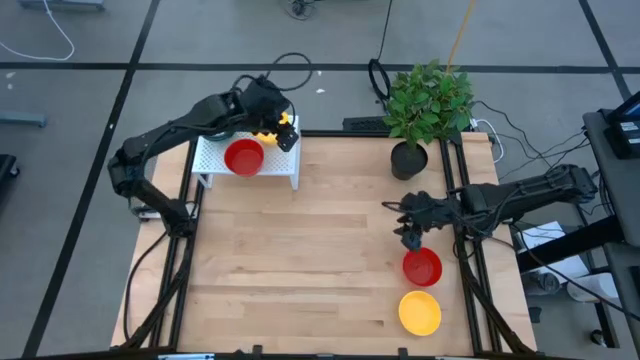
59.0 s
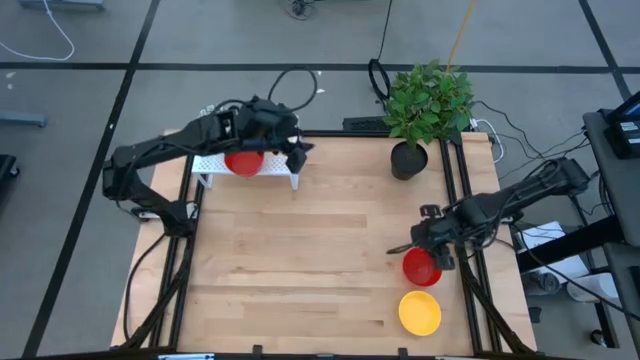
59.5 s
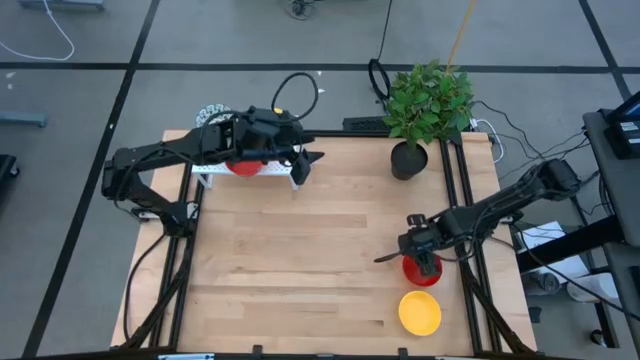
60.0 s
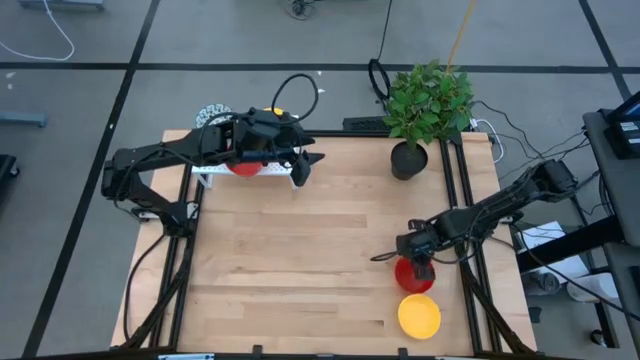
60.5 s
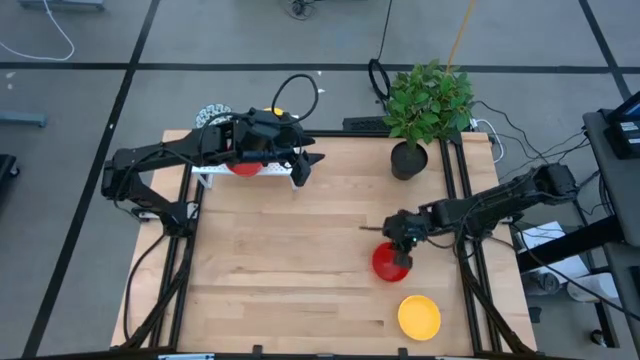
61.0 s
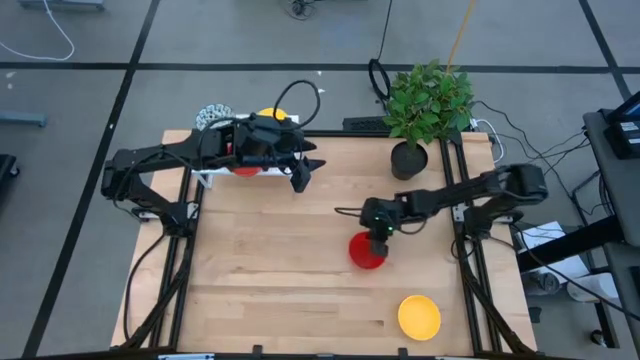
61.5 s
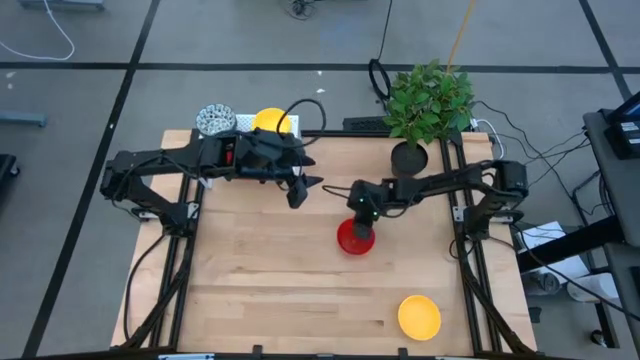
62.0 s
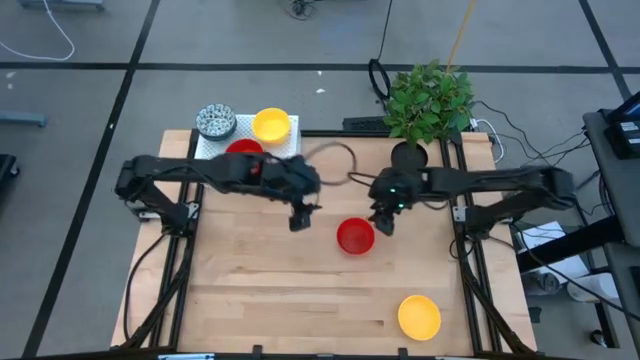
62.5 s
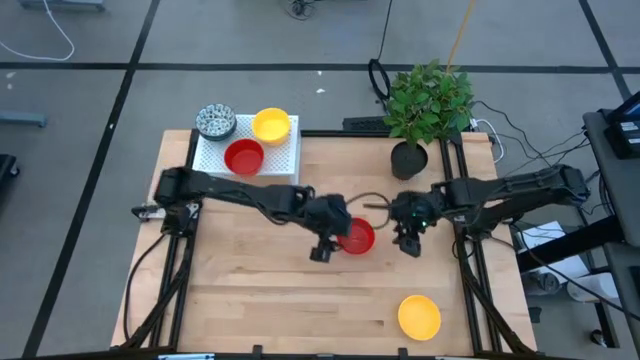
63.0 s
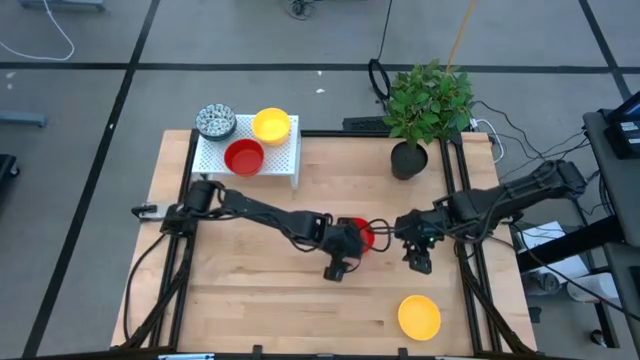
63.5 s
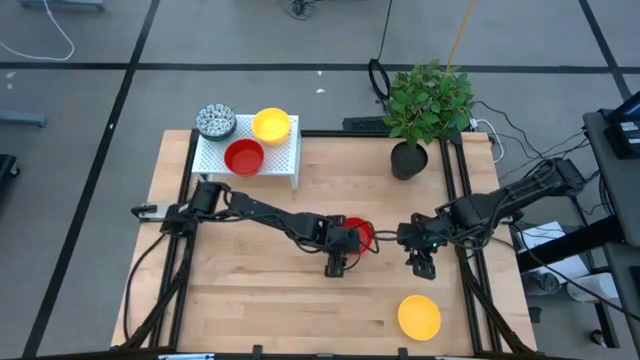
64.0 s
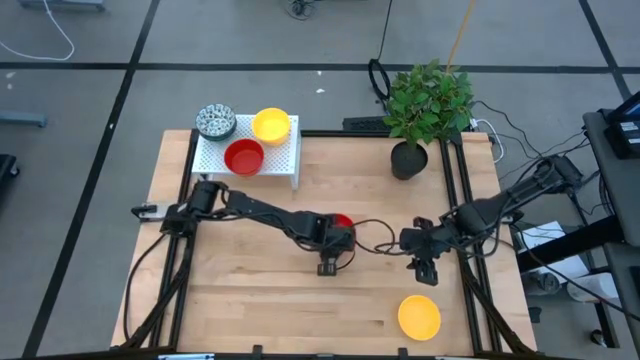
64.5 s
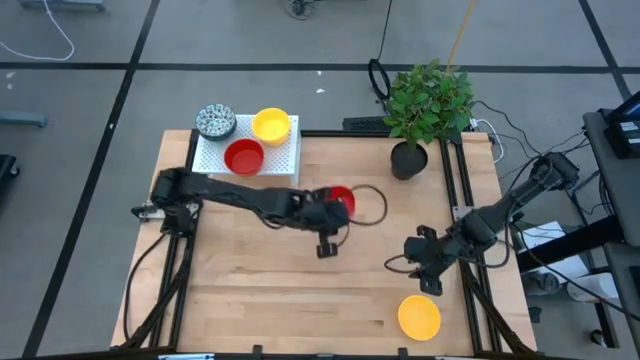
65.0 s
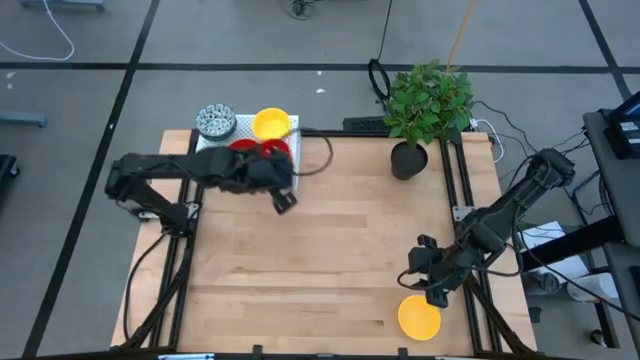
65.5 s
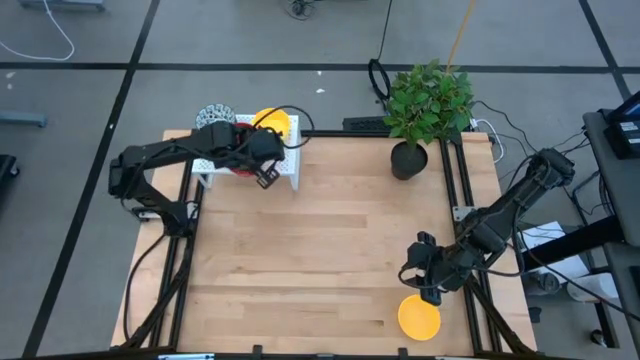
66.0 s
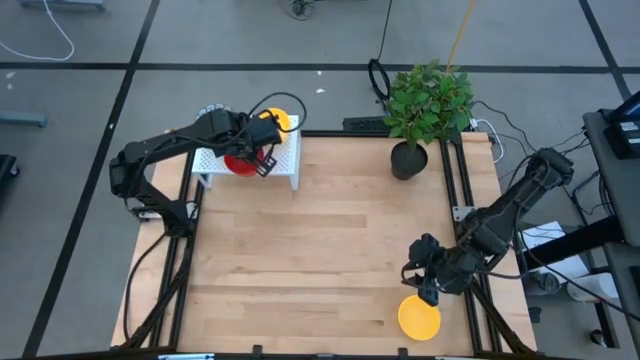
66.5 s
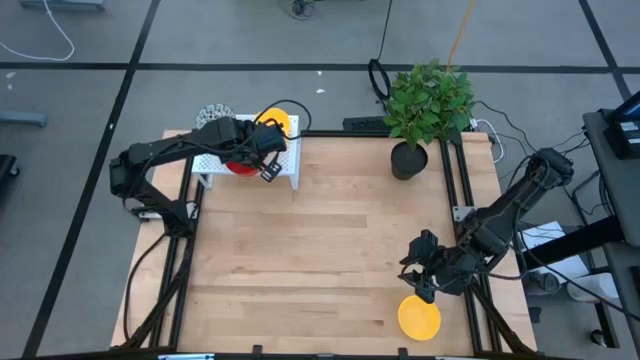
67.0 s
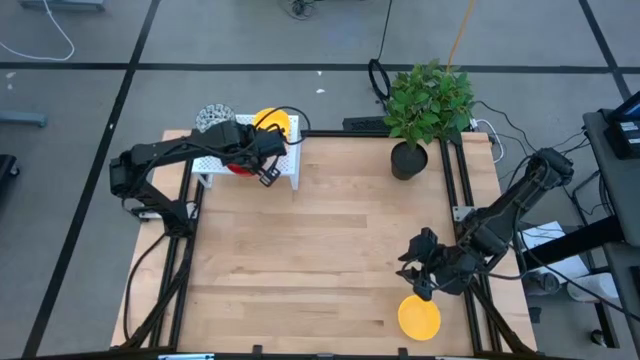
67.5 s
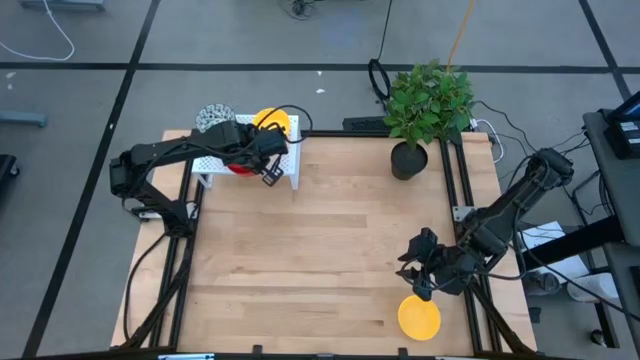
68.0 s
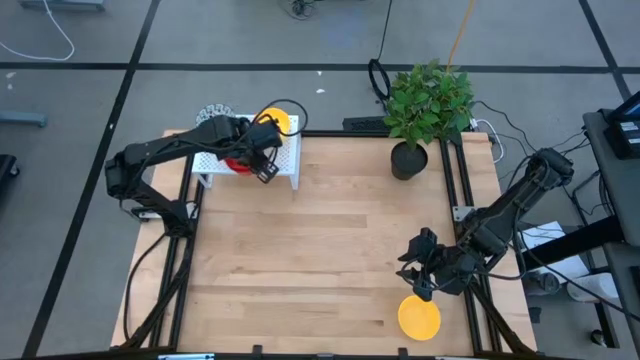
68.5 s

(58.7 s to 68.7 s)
Task: Pick & Place Mini bowls
Stack the red bowl on top of the red bowl on the shelf

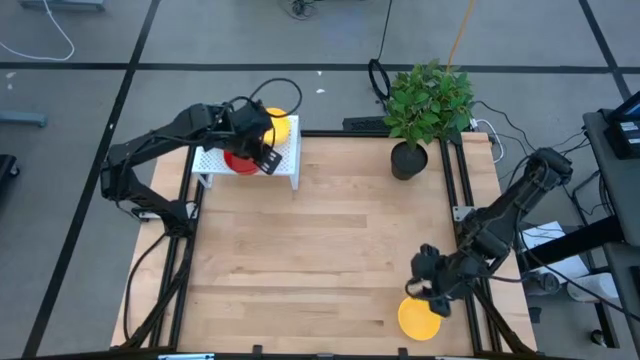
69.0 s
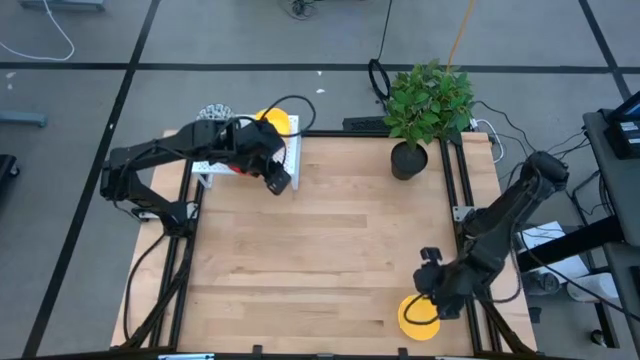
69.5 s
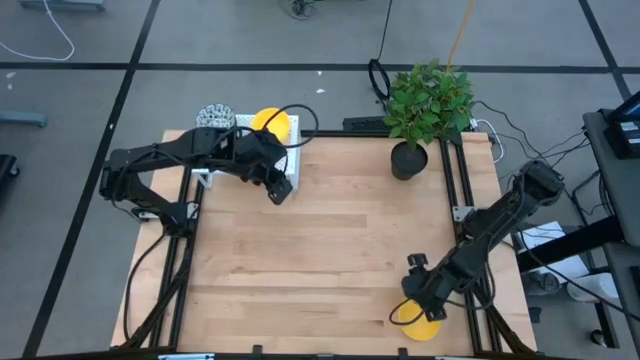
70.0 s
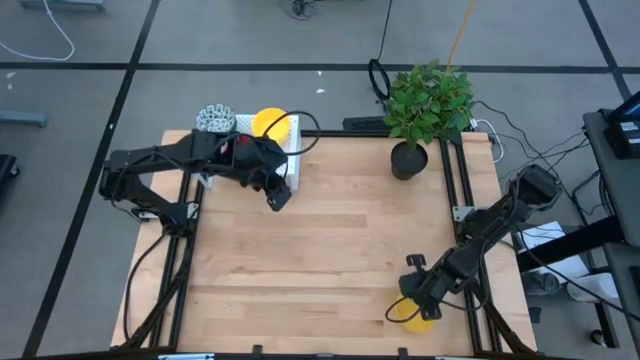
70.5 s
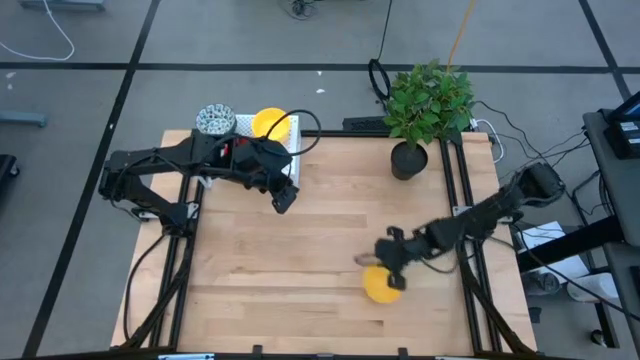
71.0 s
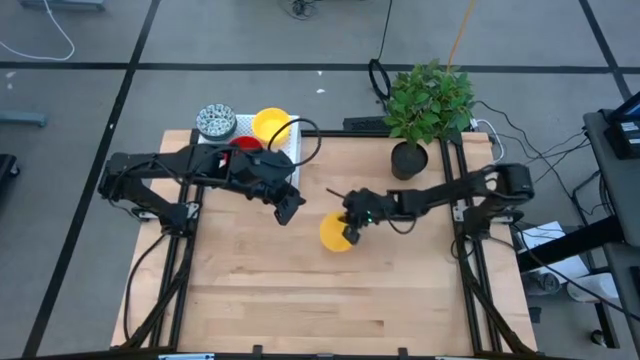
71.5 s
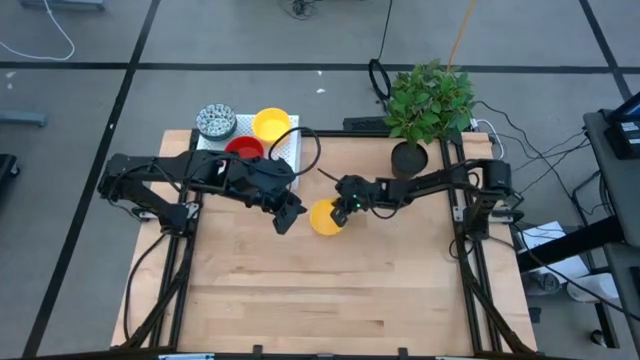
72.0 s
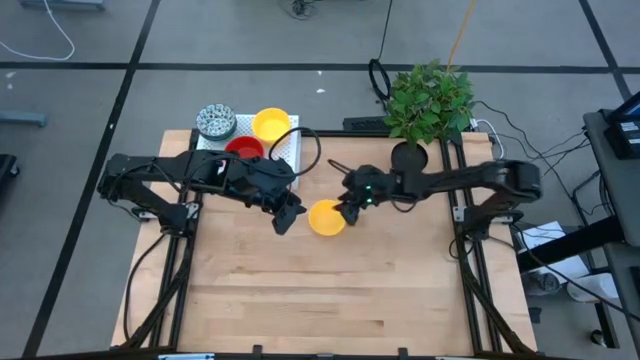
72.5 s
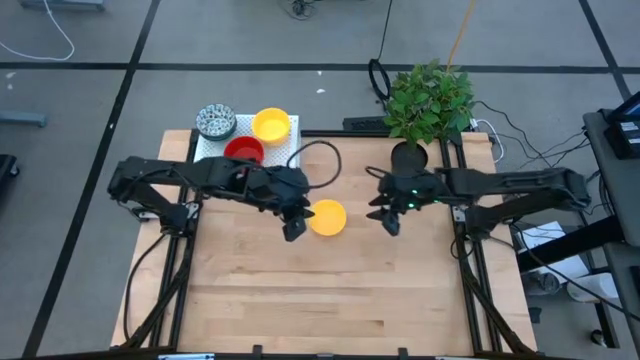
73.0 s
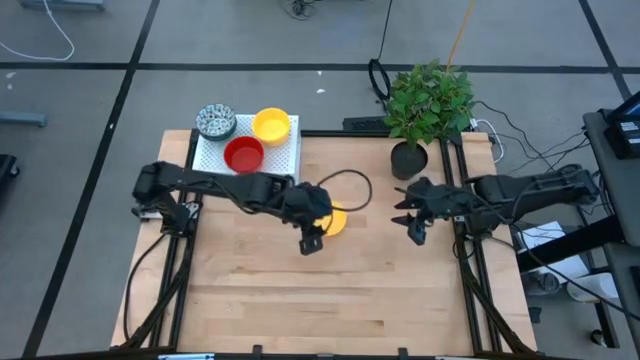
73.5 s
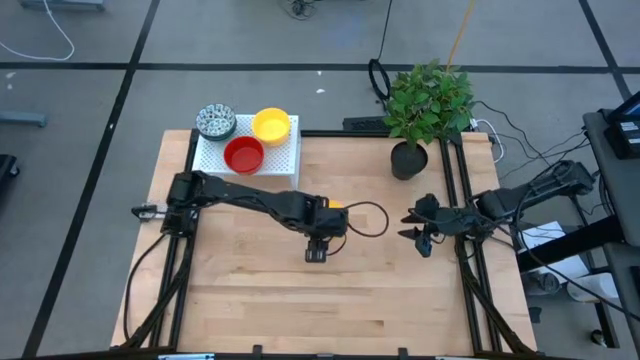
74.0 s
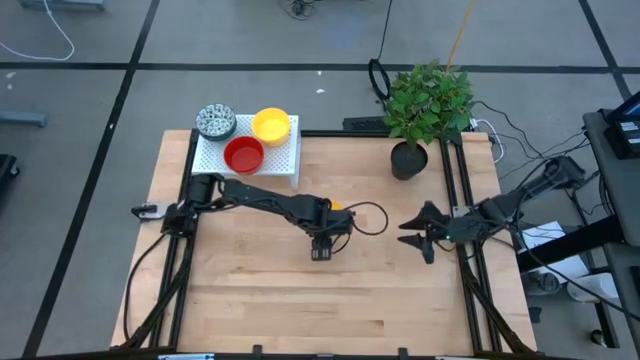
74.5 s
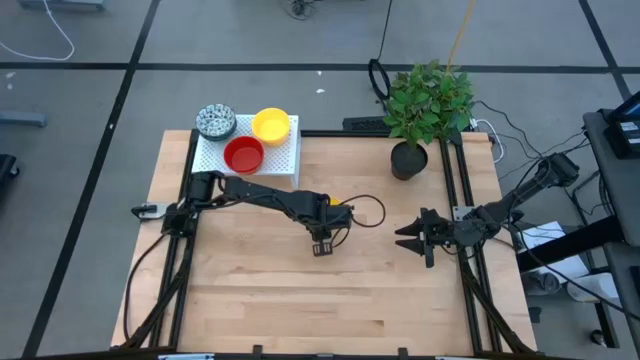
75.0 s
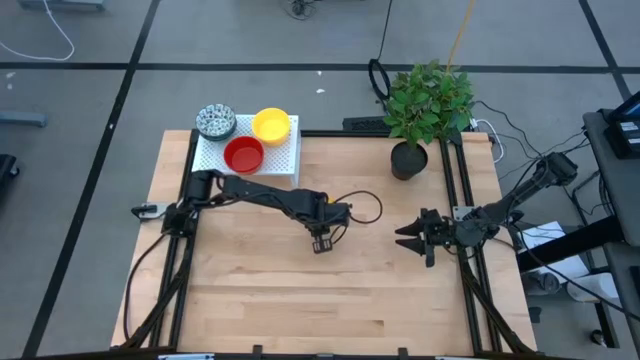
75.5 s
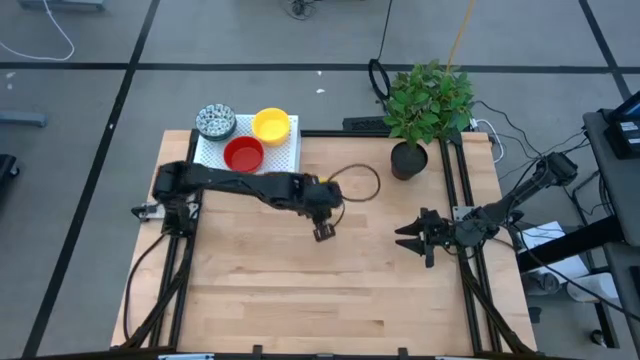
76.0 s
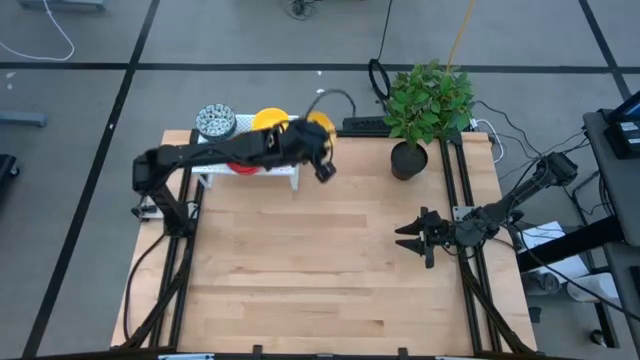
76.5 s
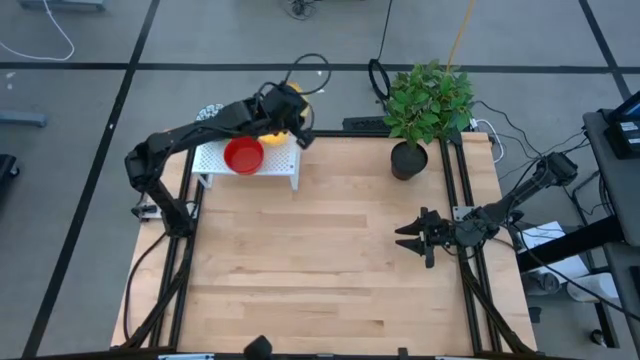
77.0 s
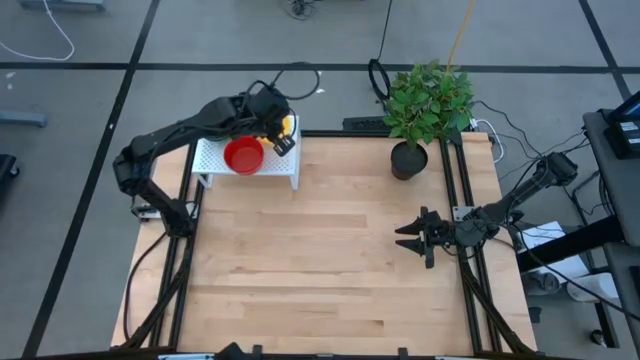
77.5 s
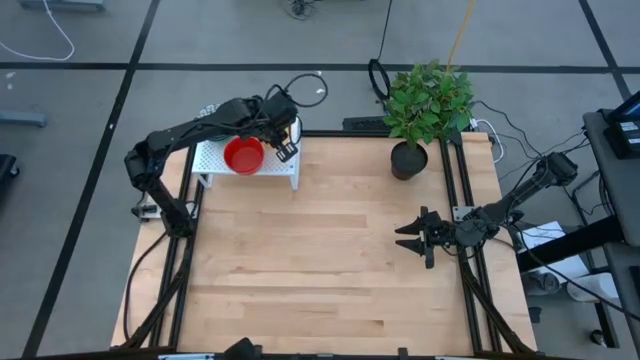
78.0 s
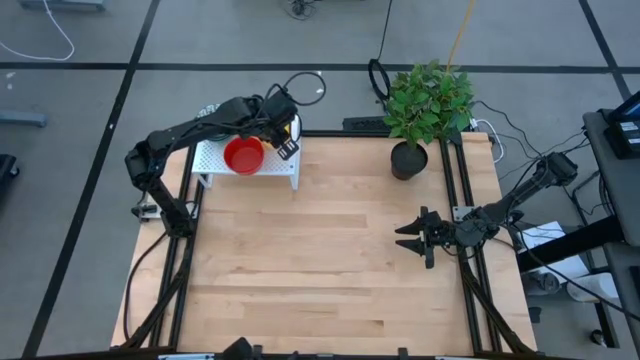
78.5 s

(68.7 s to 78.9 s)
Stack the yellow bowl on top of the yellow bowl on the shelf

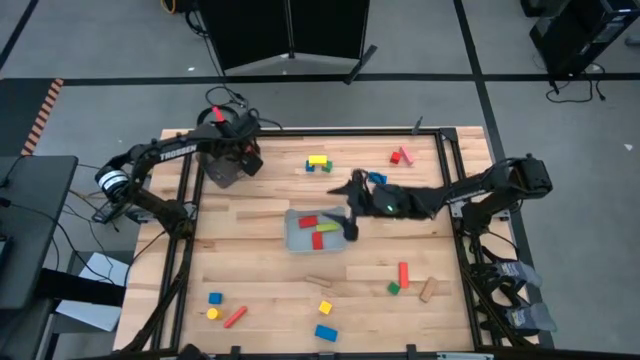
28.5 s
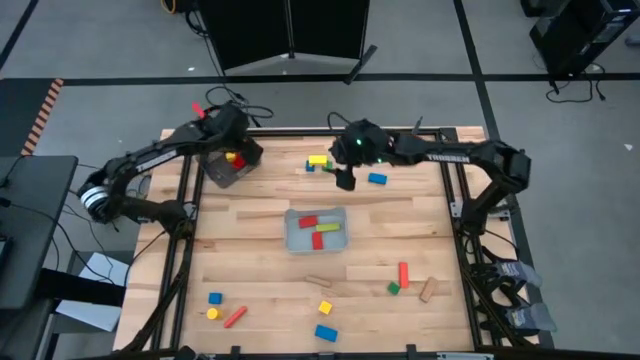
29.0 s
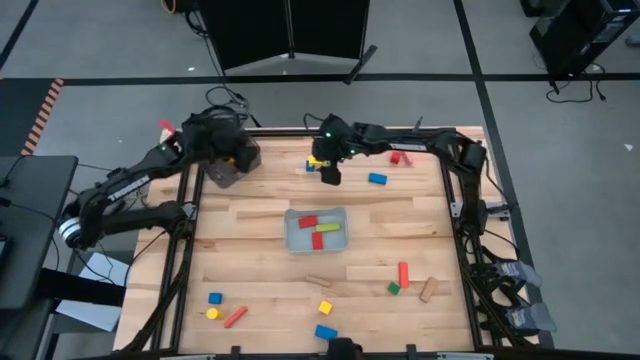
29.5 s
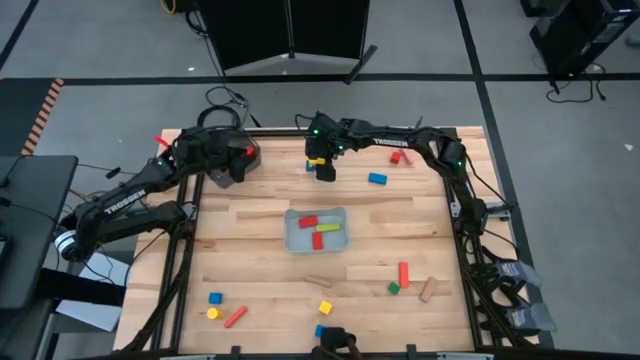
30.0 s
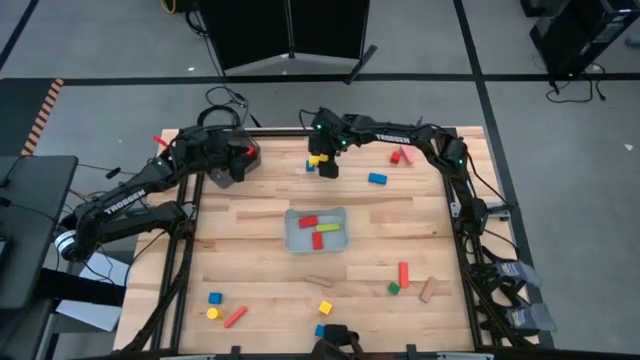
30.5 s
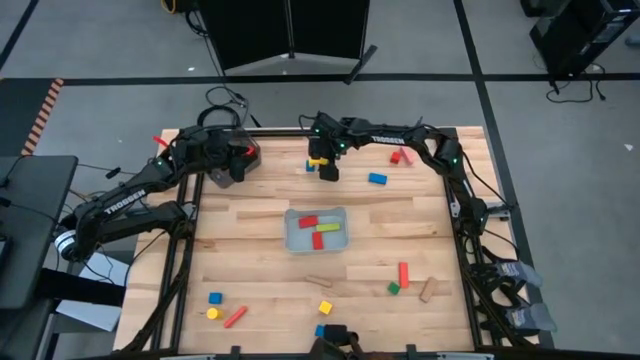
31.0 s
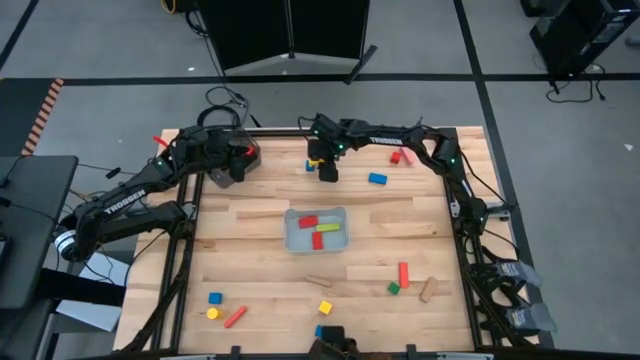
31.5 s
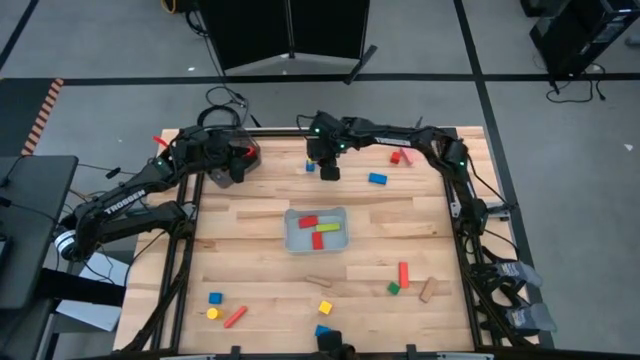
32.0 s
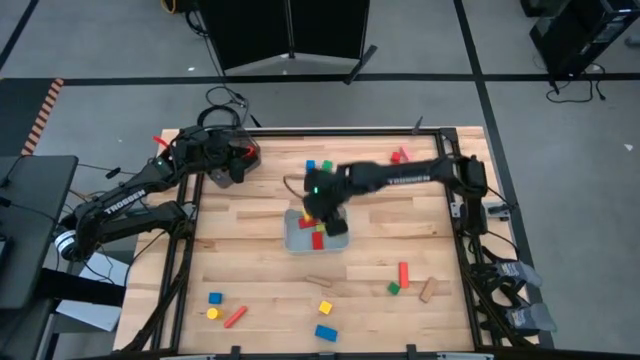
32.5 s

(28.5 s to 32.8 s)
Task: Sort blocks by size
Put the yellow arch block into the gray bin
